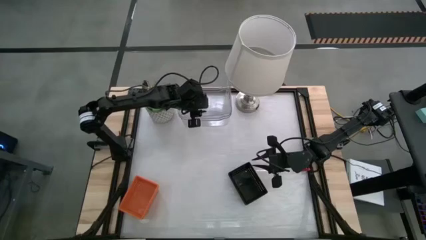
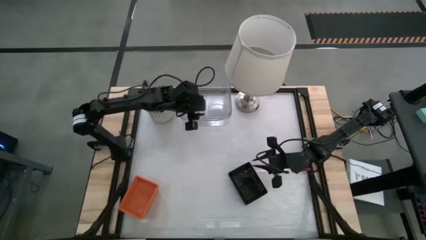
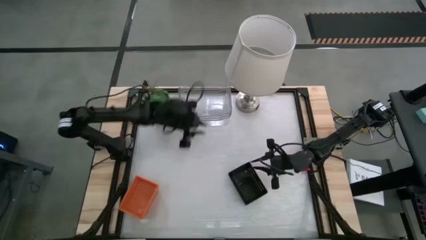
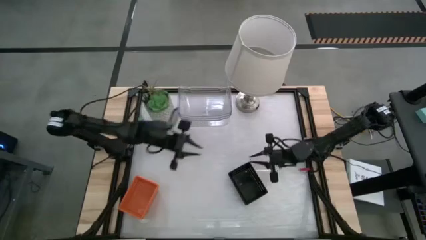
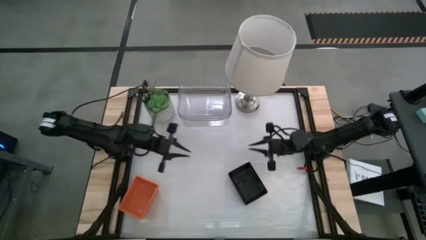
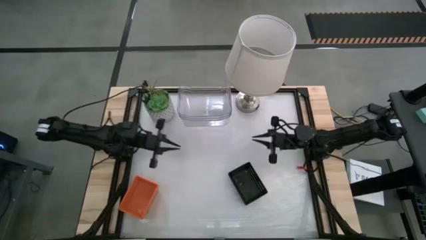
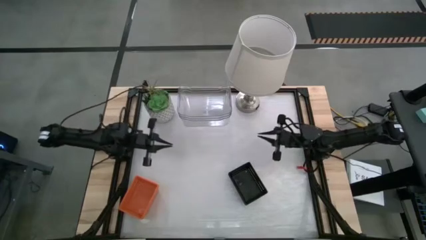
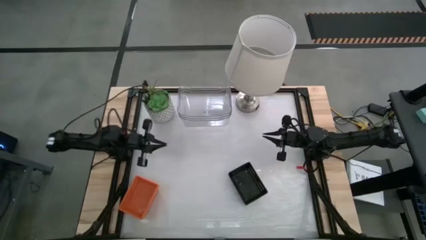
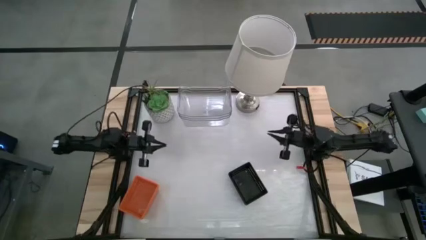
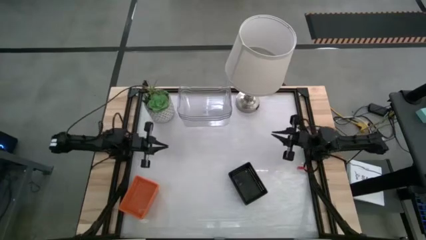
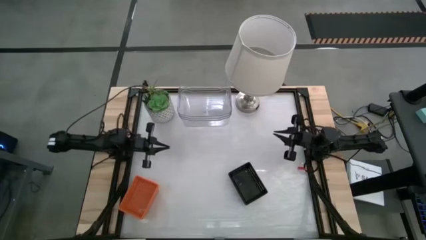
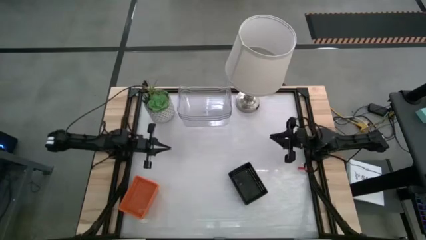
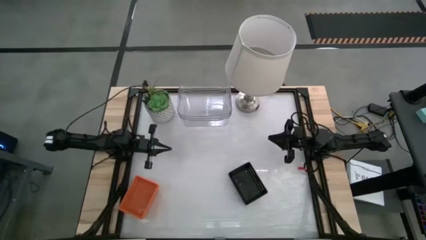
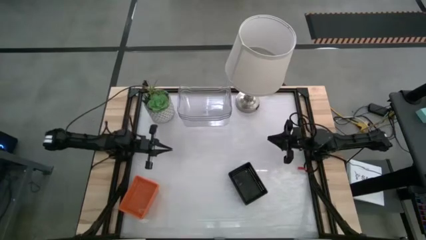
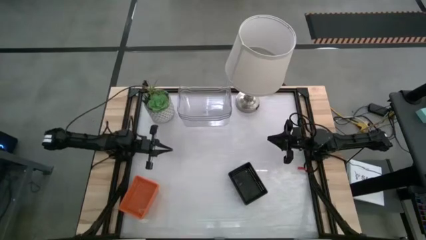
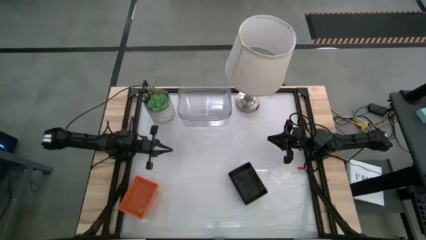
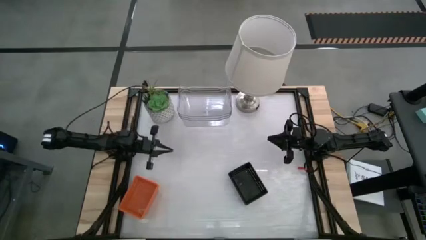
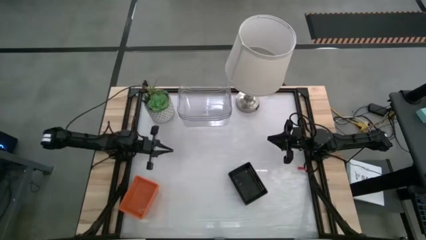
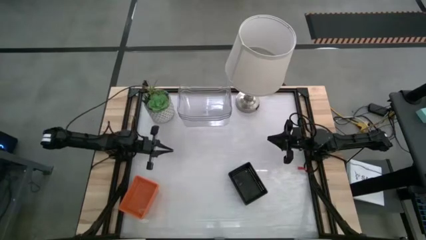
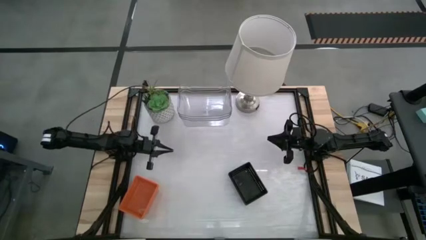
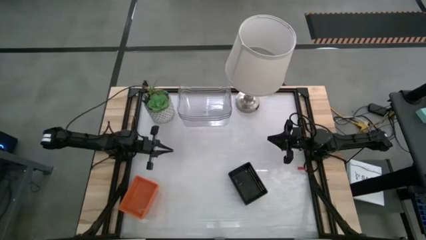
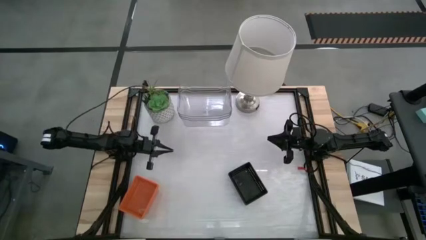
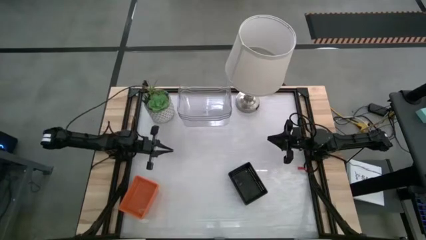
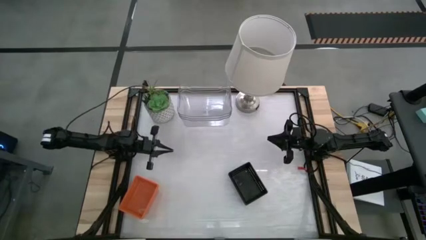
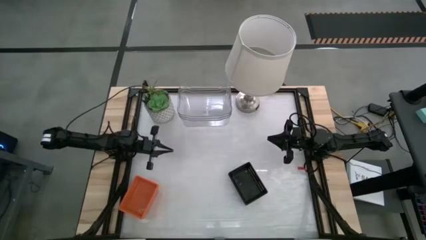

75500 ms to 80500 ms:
Return to Home Position
